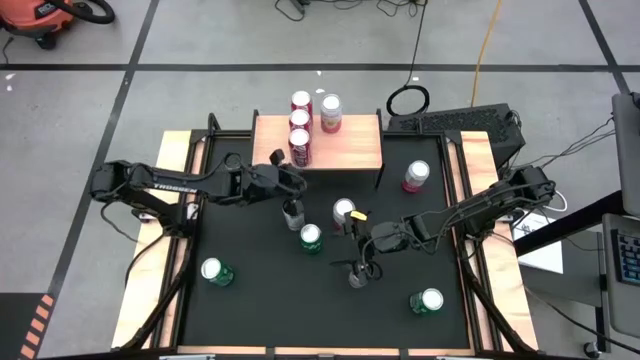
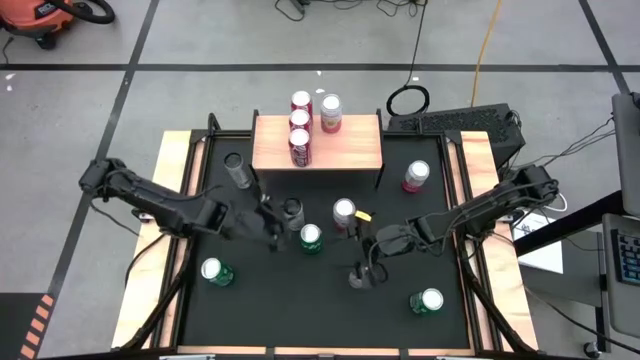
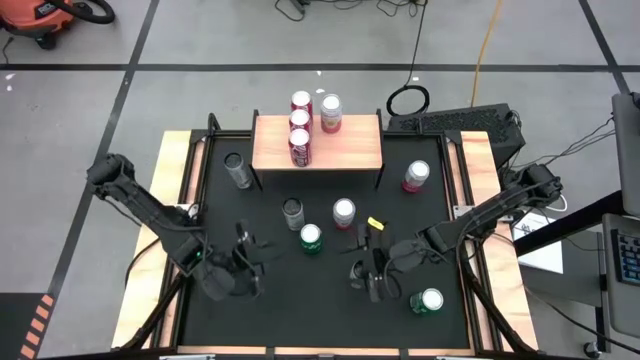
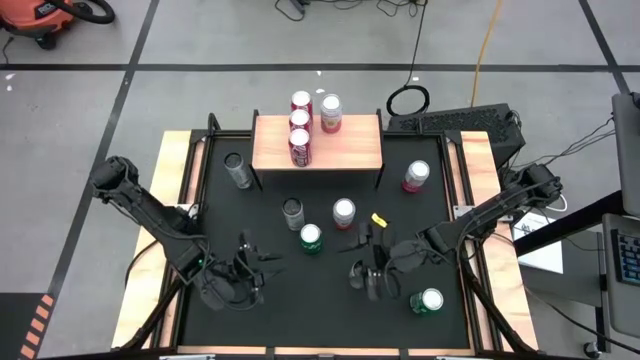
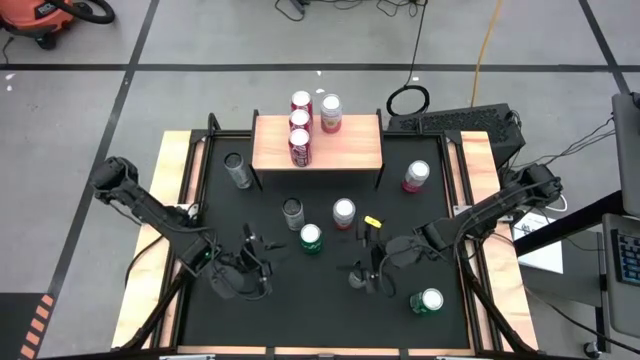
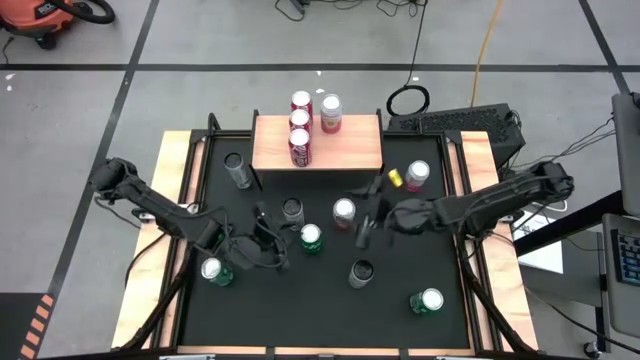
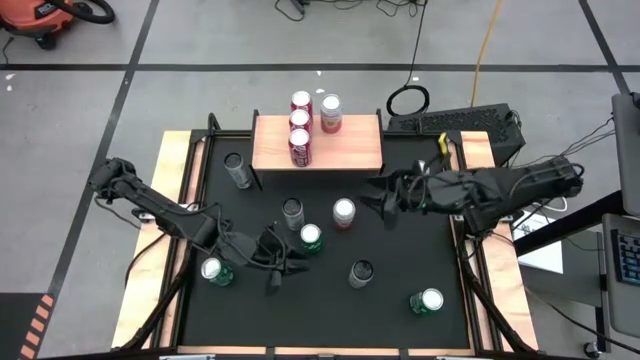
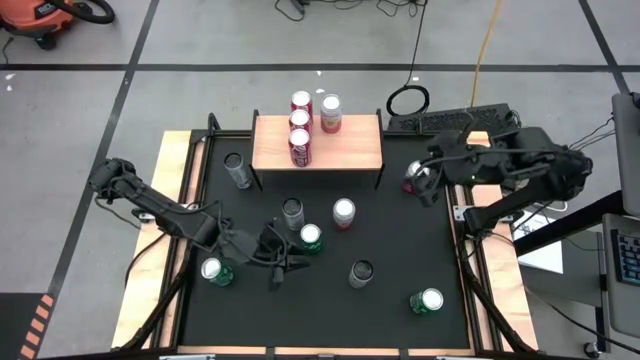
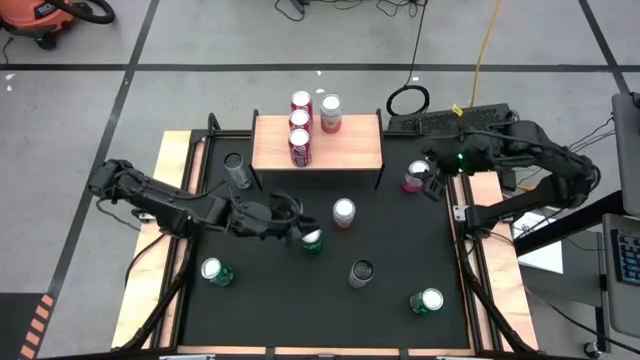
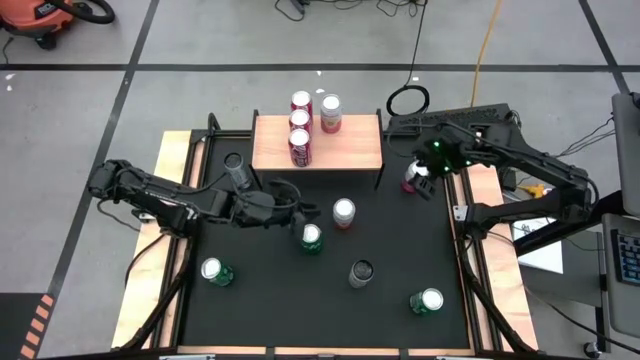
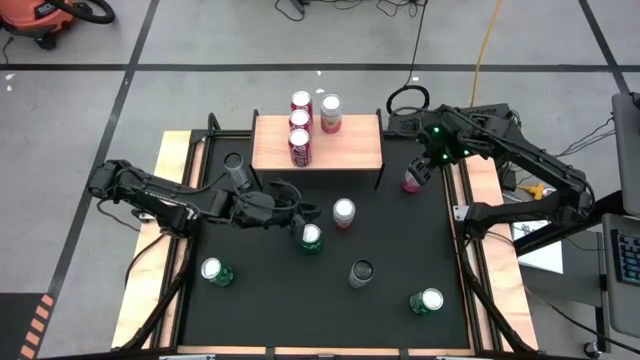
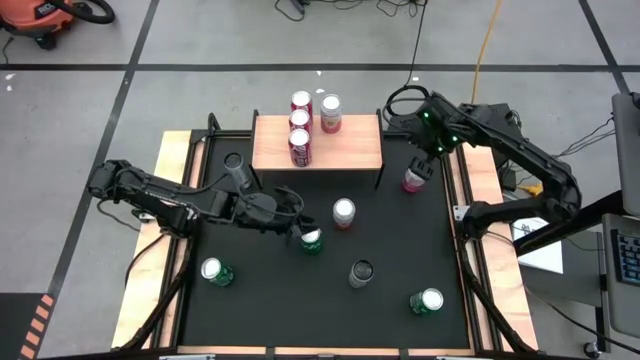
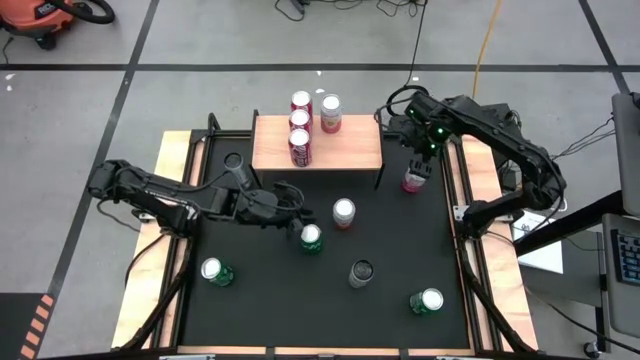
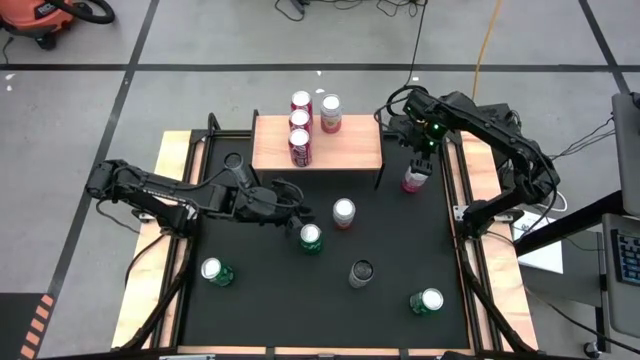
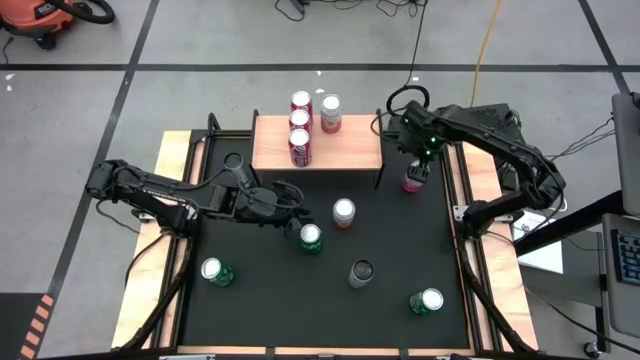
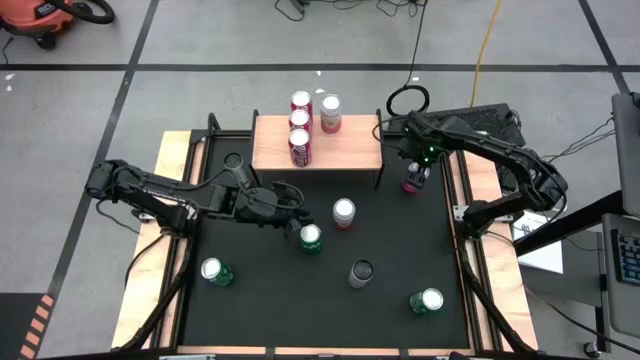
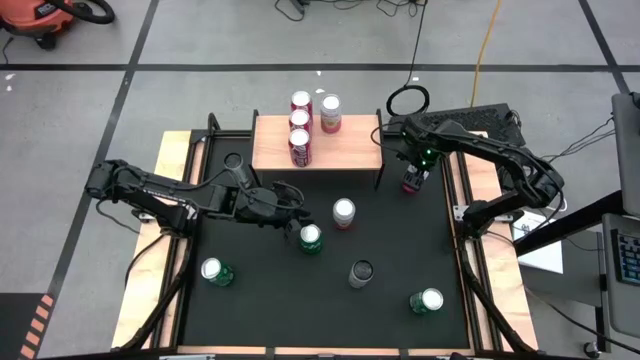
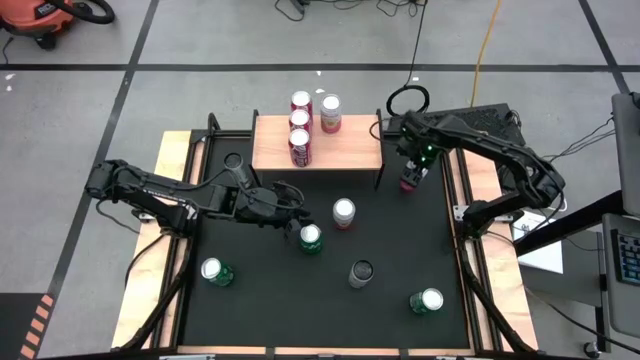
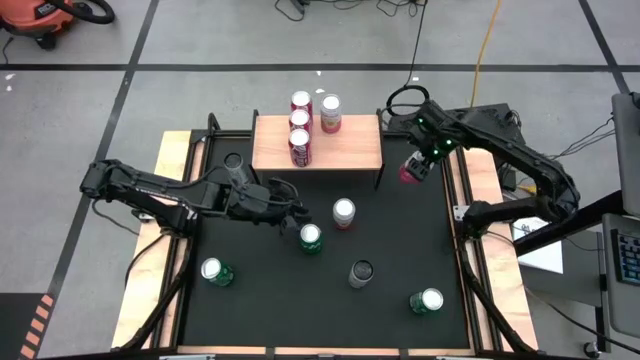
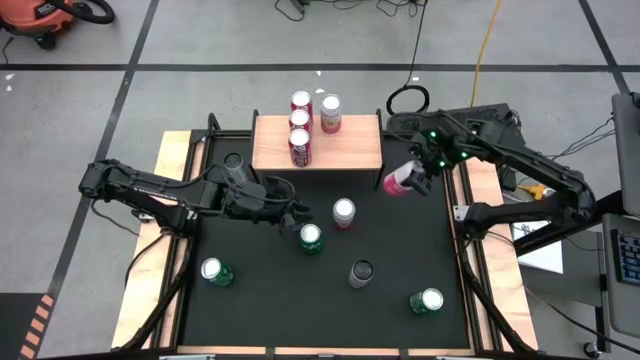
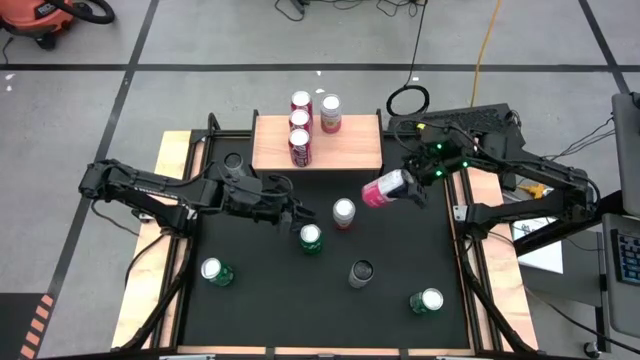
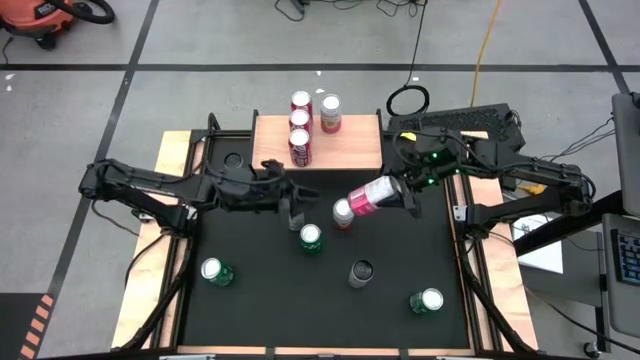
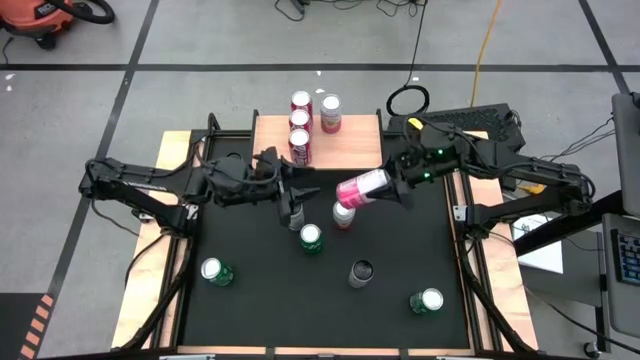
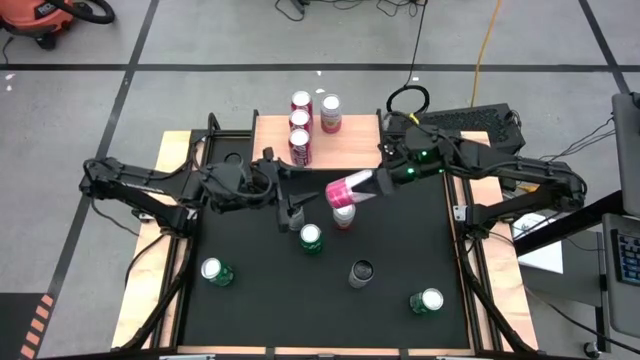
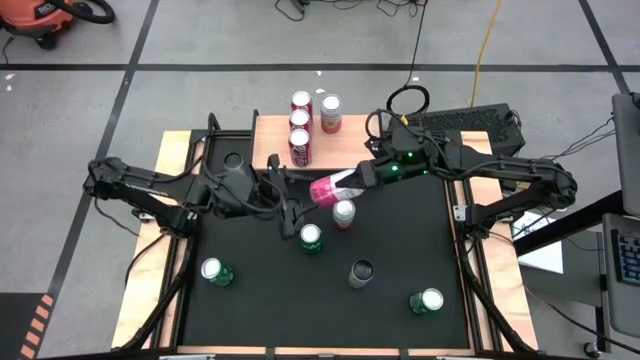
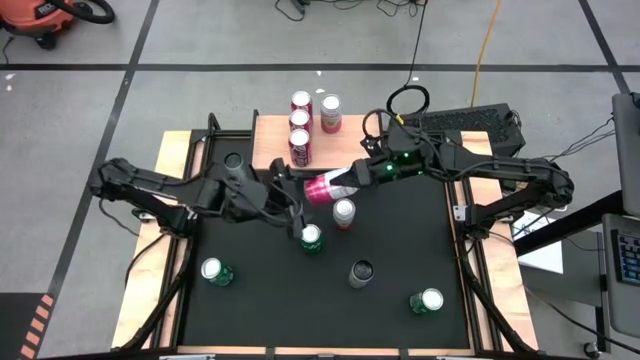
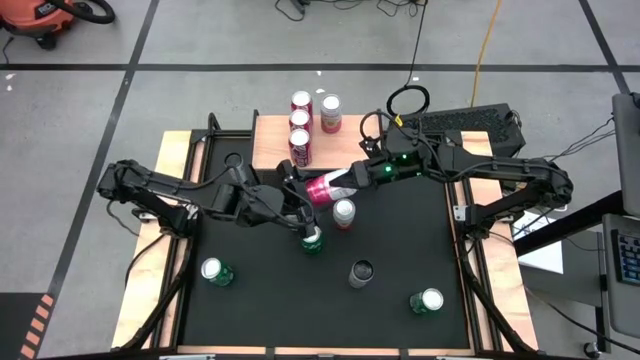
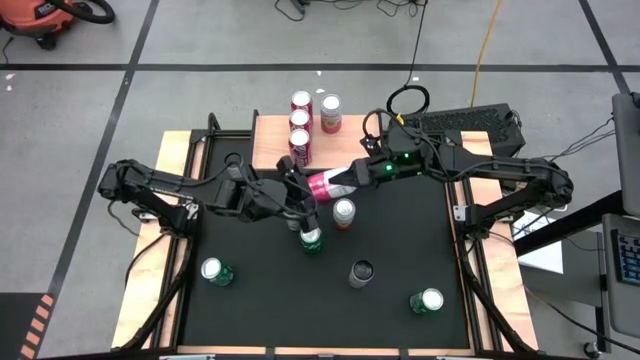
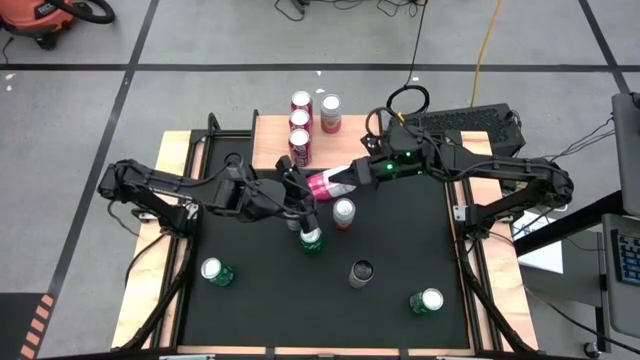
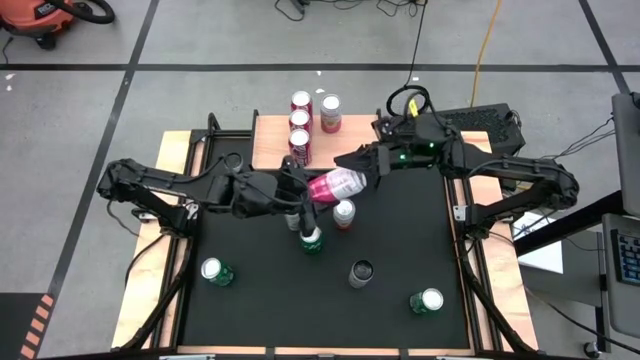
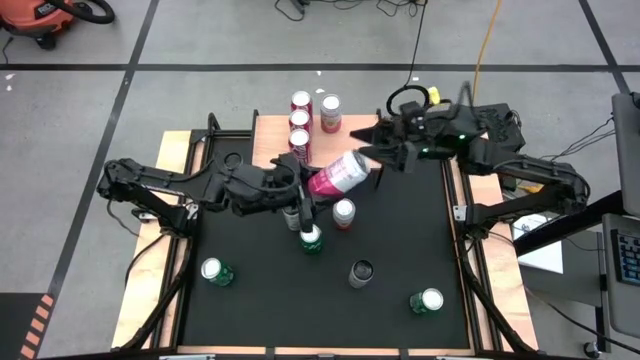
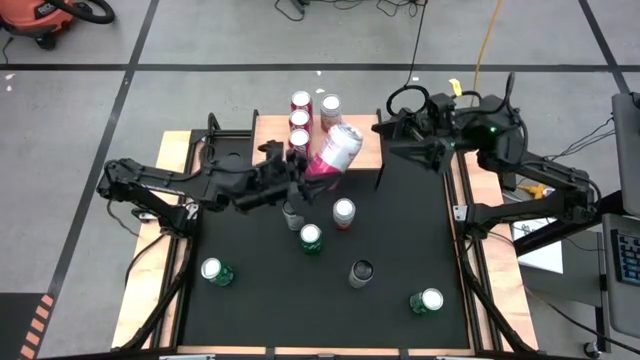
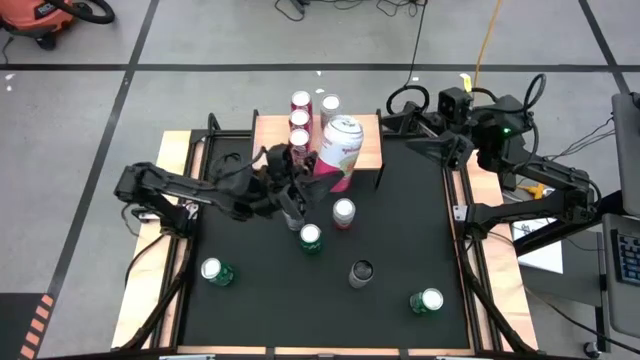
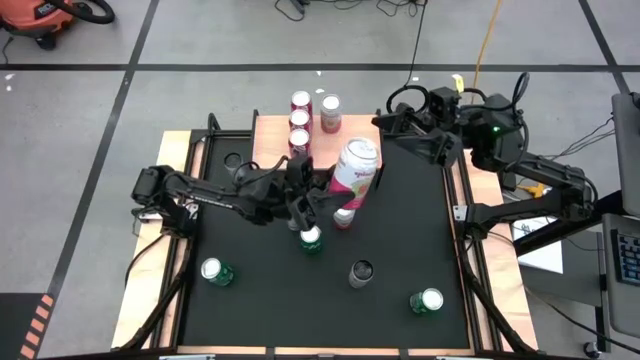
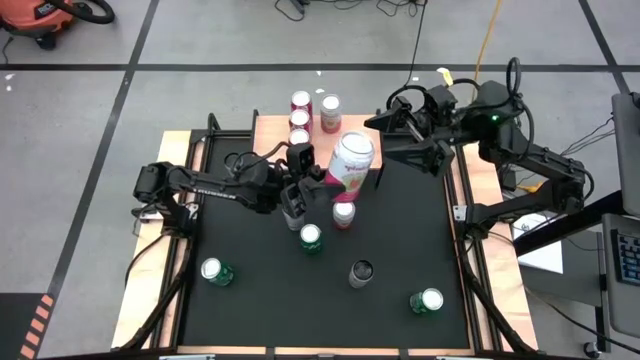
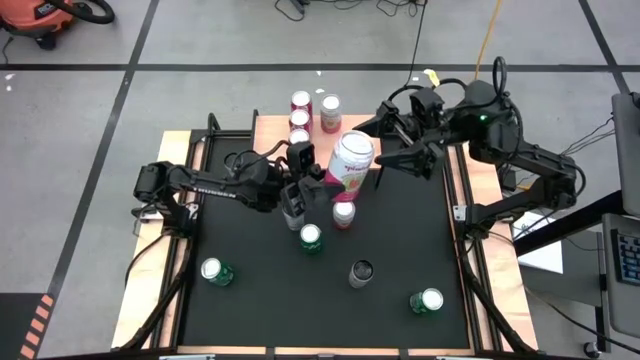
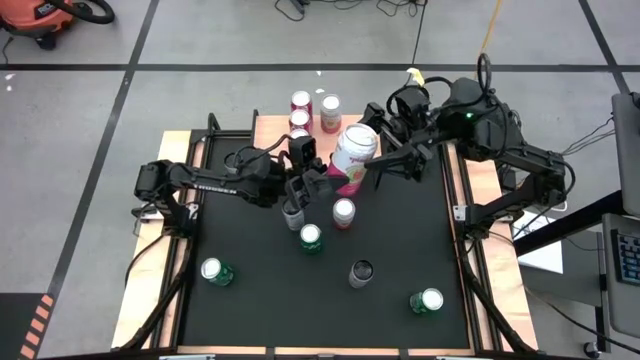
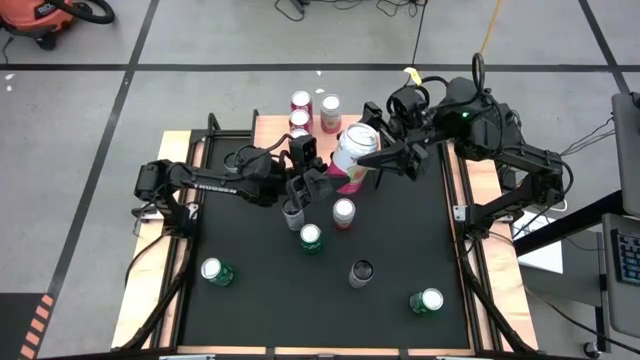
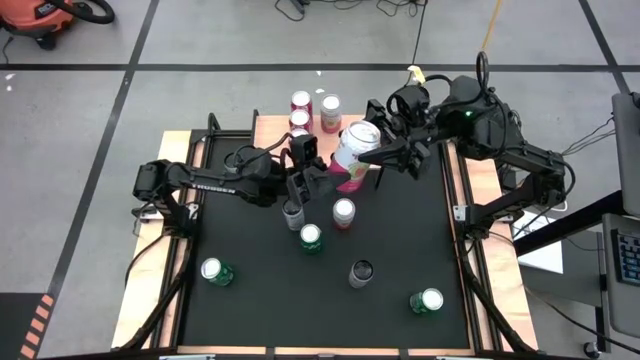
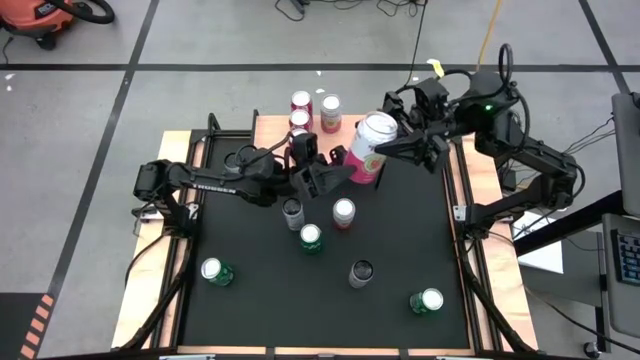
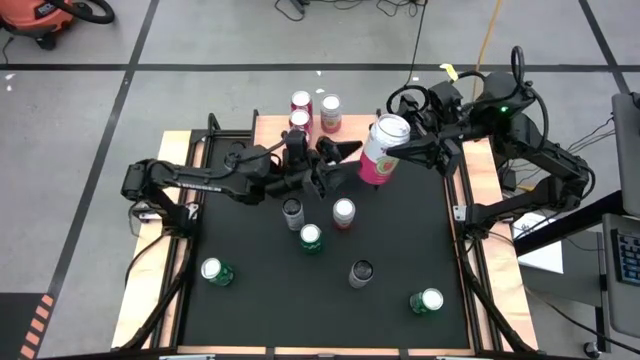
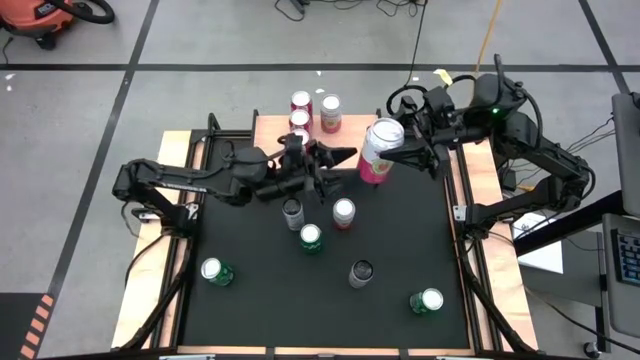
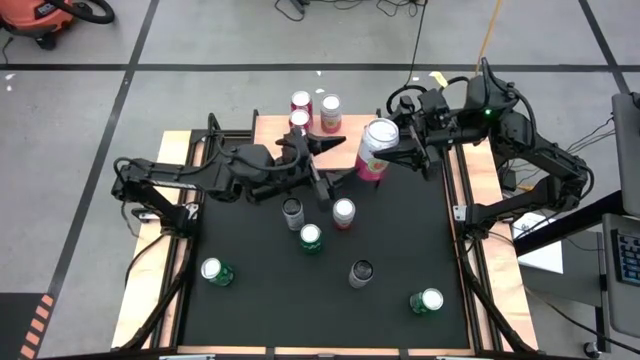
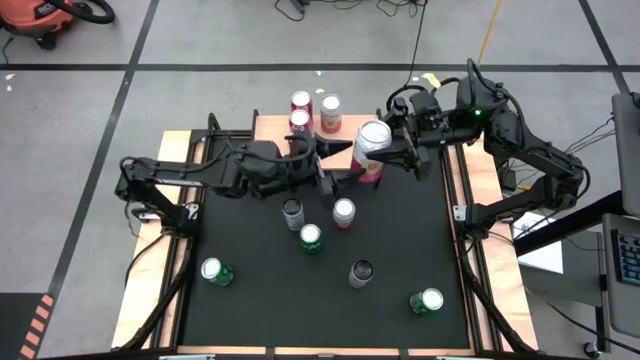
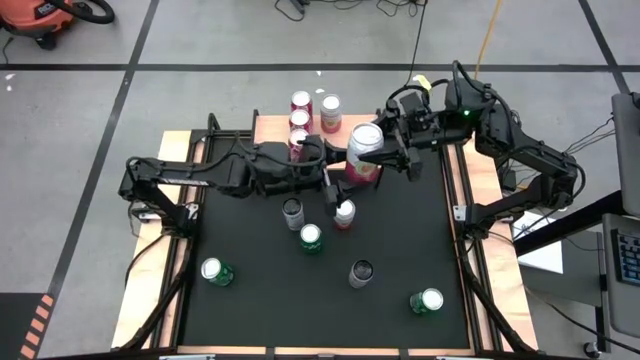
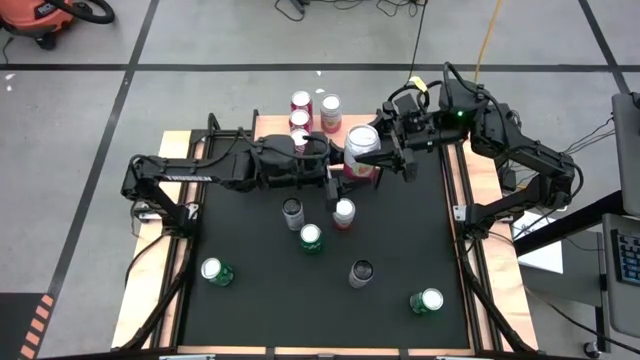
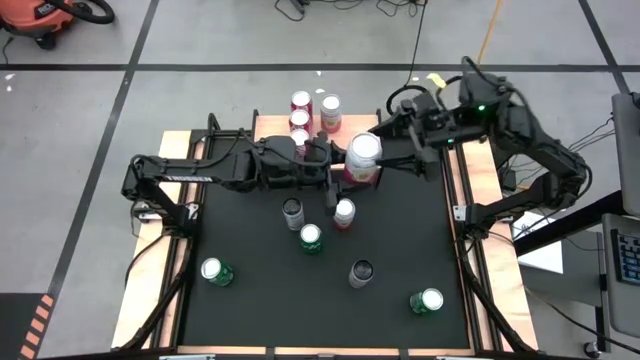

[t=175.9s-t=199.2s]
Task: Place canned beverage on shelf
Put the top white pink soda can on the shelf aligned with the other white pink soda can
